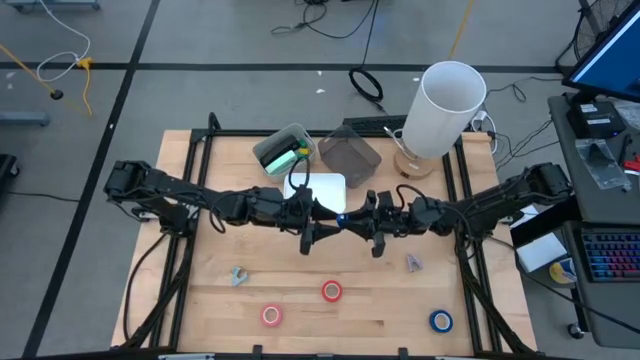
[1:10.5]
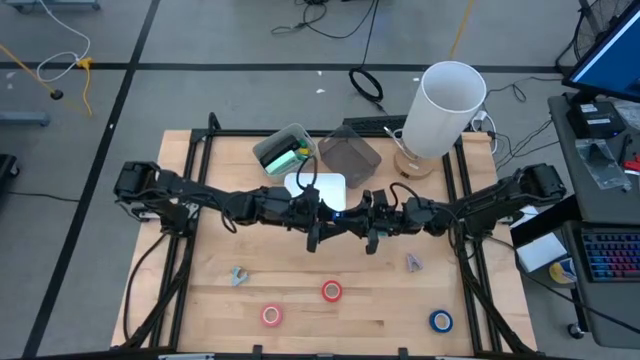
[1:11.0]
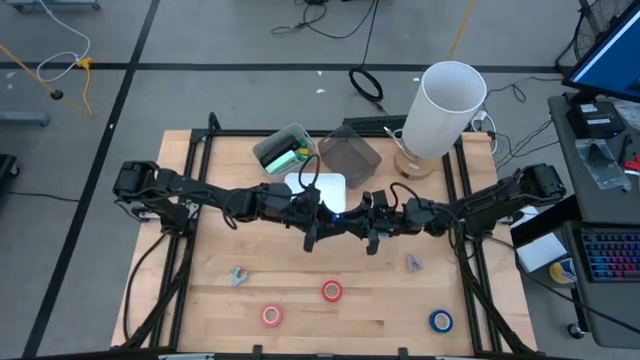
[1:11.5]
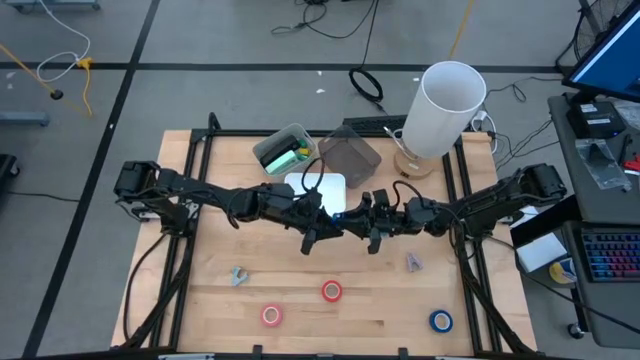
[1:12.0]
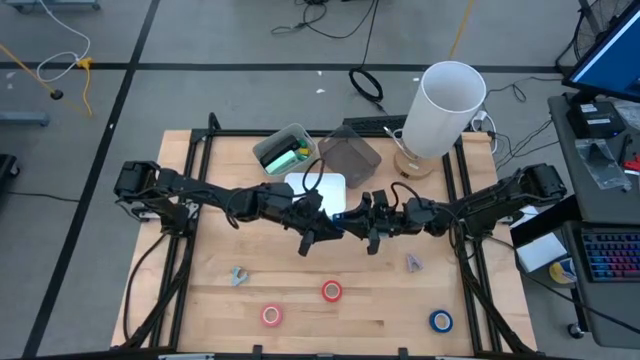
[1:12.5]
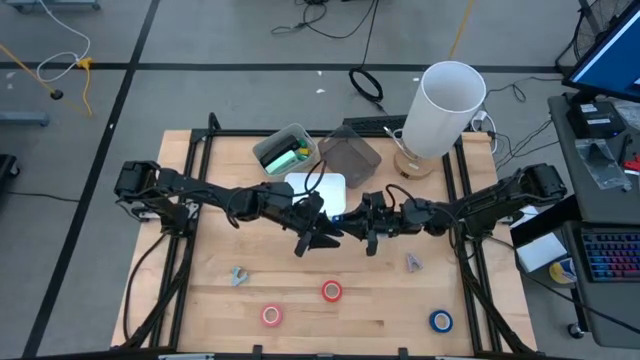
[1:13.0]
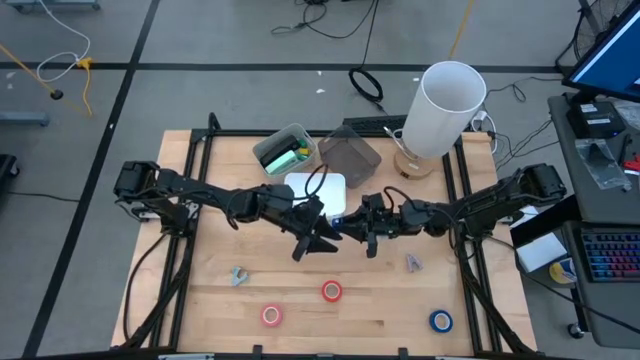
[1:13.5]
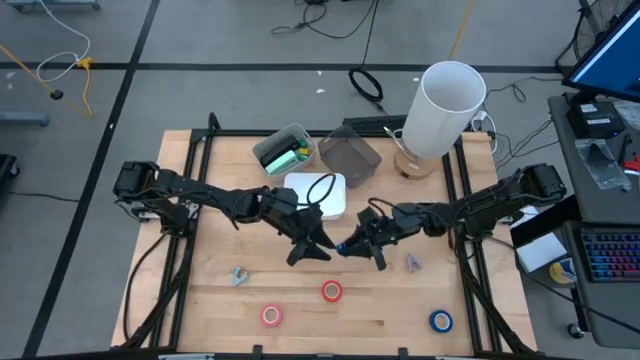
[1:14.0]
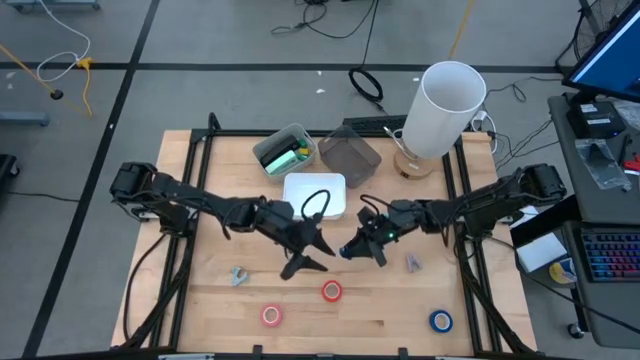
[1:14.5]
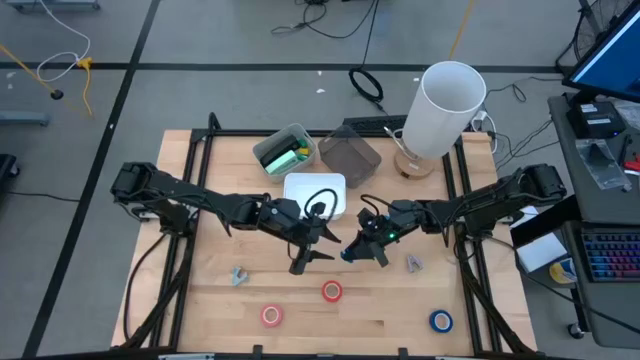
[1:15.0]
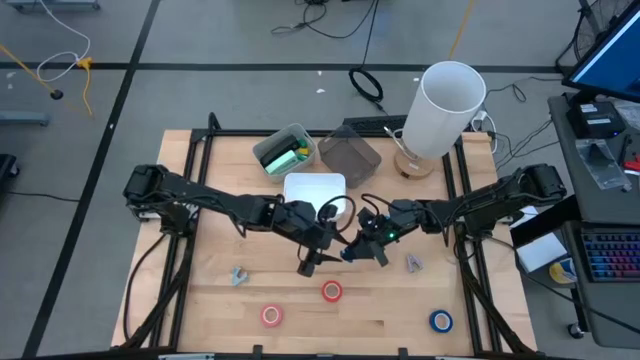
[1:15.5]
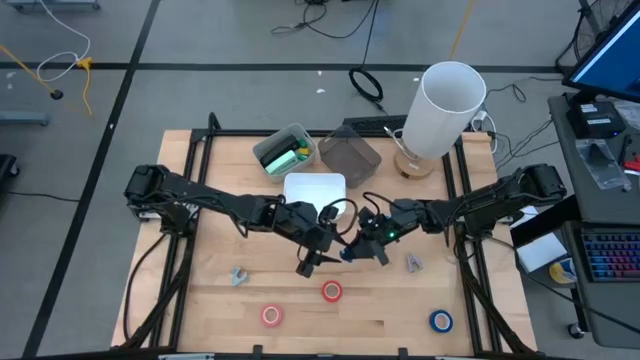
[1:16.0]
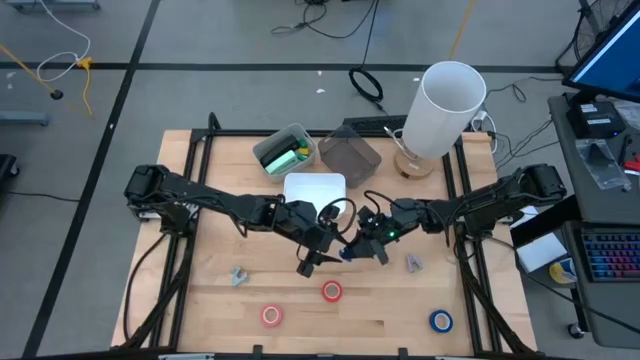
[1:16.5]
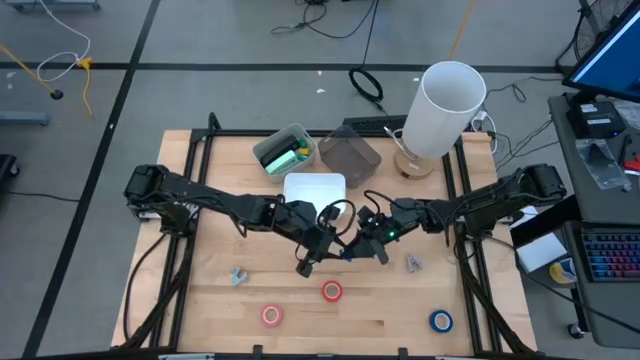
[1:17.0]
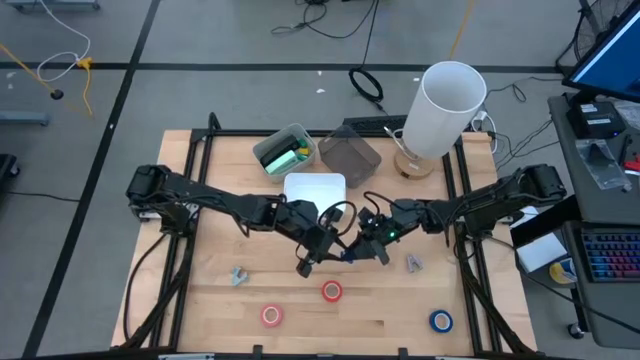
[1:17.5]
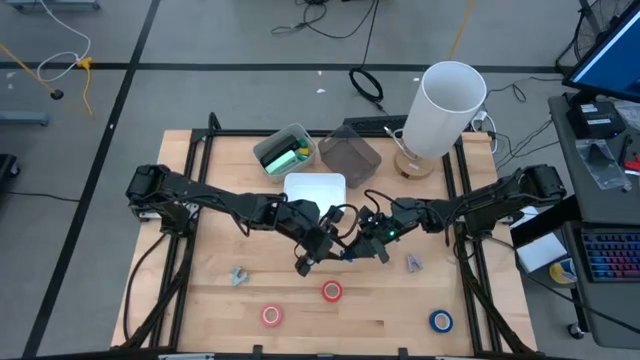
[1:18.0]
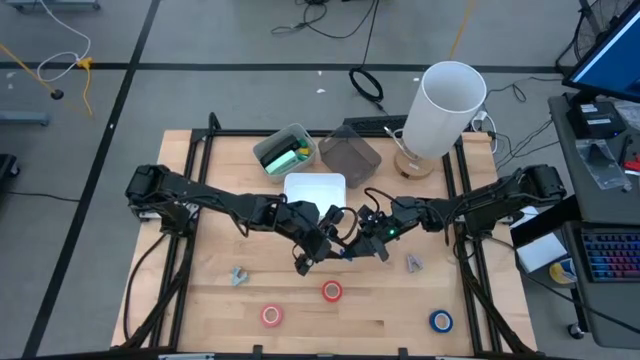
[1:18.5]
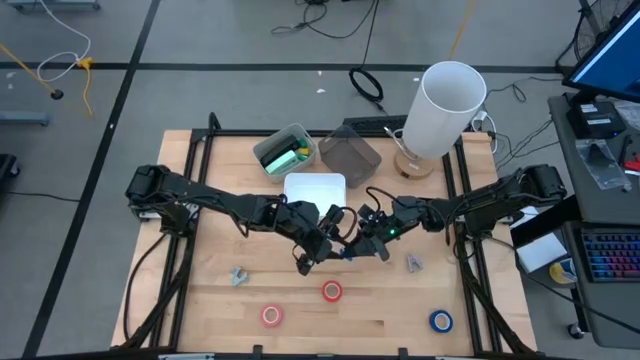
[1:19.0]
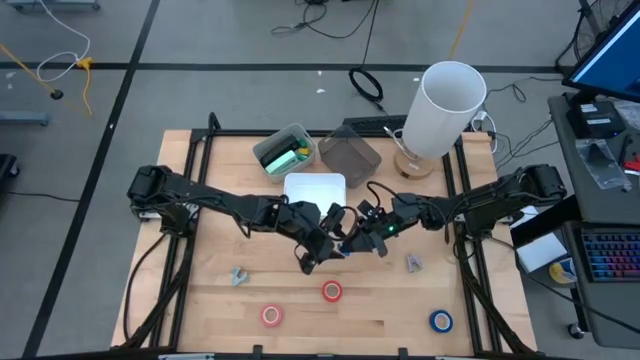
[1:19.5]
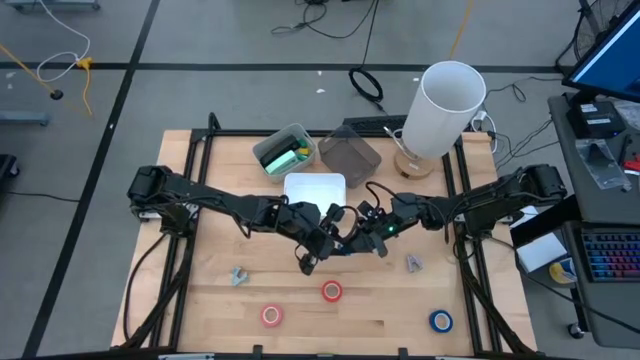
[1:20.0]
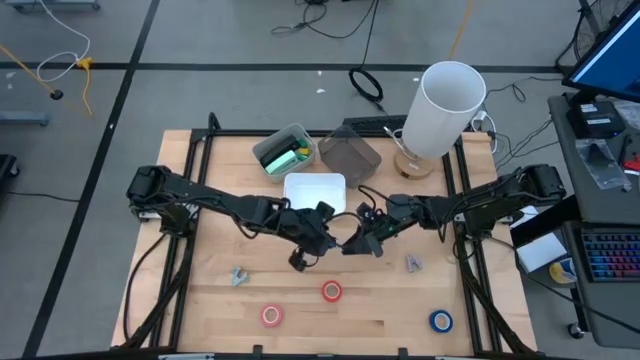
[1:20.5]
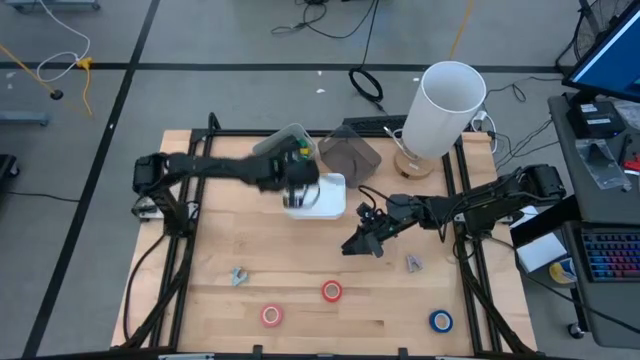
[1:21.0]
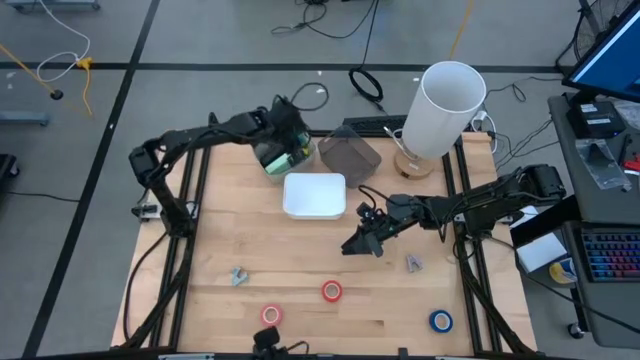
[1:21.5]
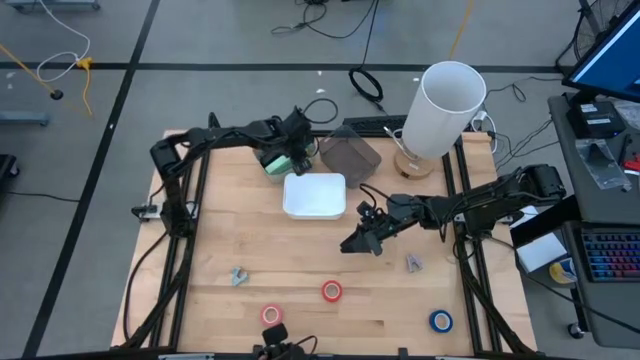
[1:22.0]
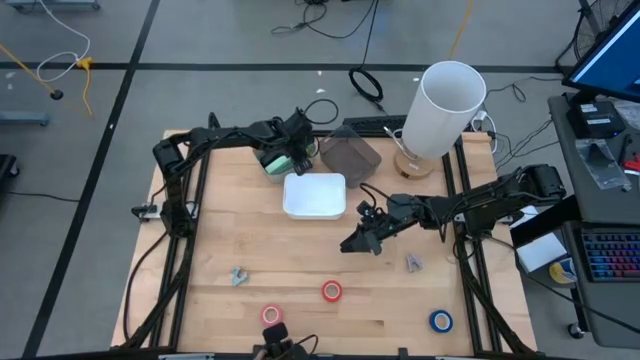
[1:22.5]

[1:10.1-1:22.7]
Task: Pick and place Stapler, Stapler remover, tape
Put the blue stapler into the gray bin

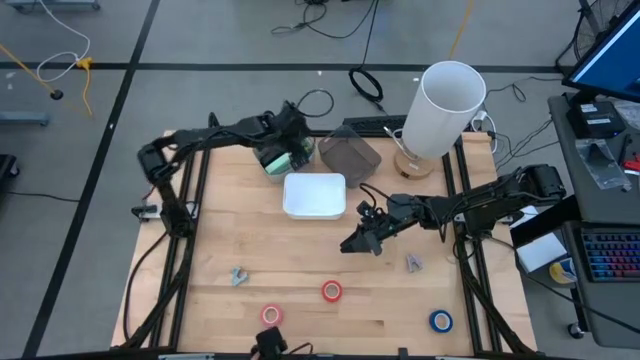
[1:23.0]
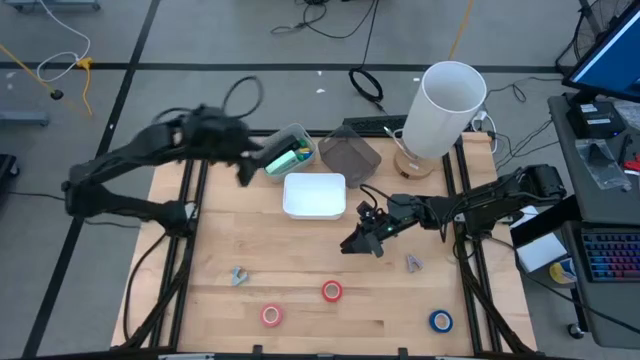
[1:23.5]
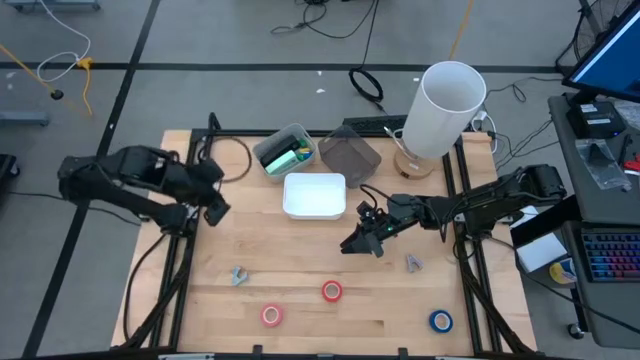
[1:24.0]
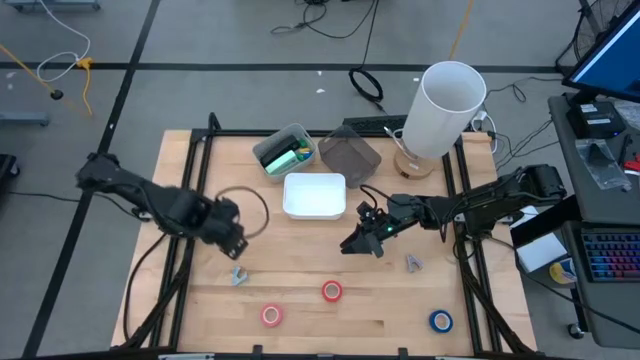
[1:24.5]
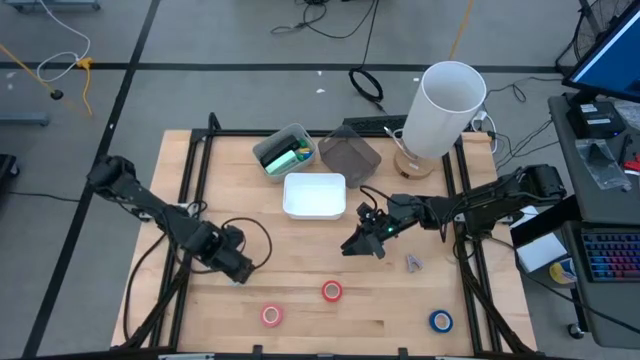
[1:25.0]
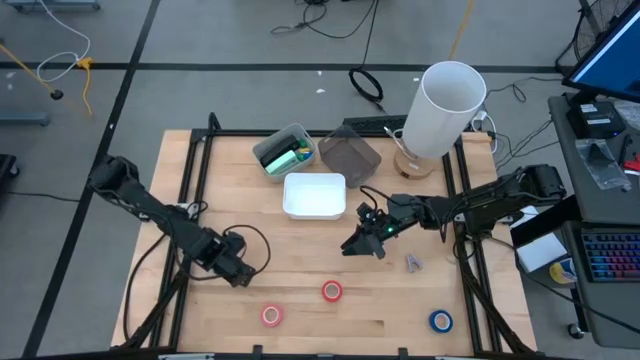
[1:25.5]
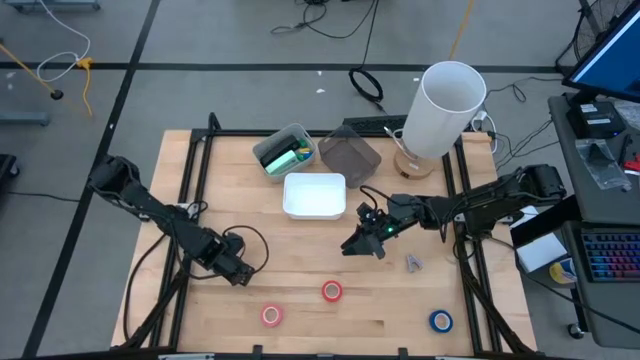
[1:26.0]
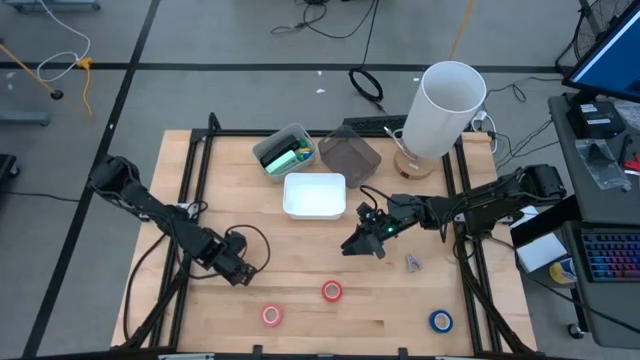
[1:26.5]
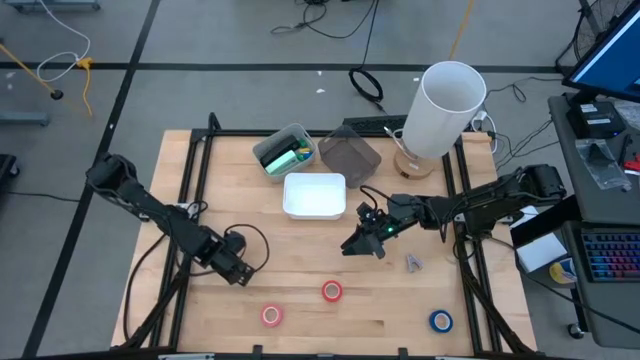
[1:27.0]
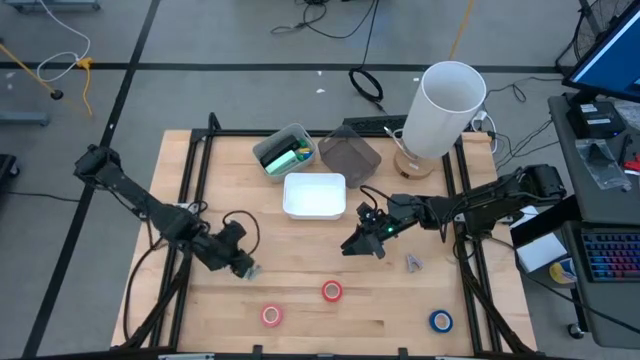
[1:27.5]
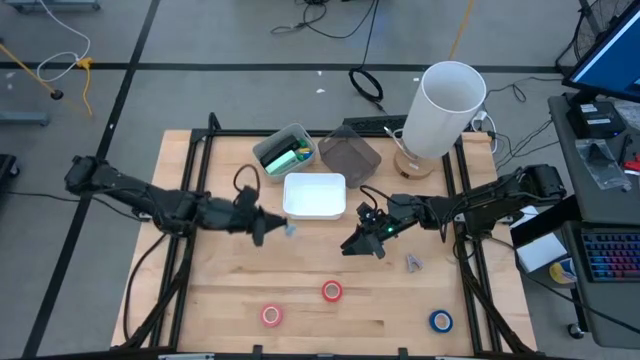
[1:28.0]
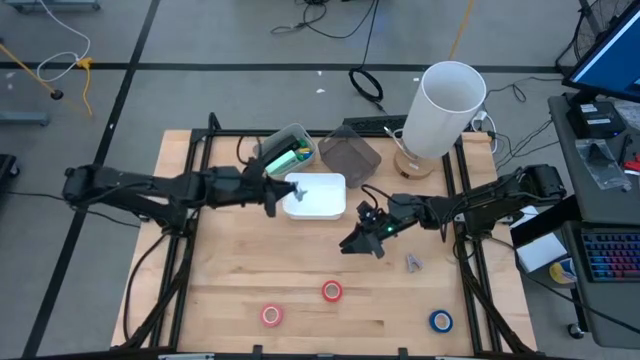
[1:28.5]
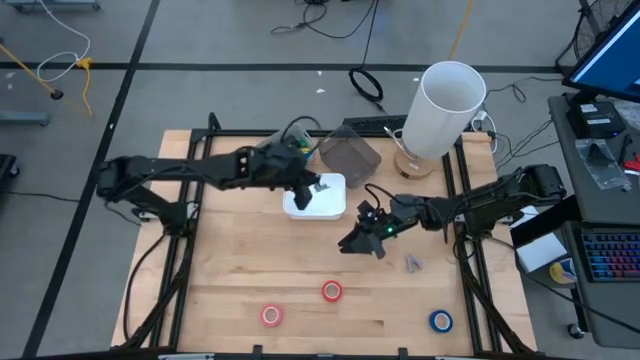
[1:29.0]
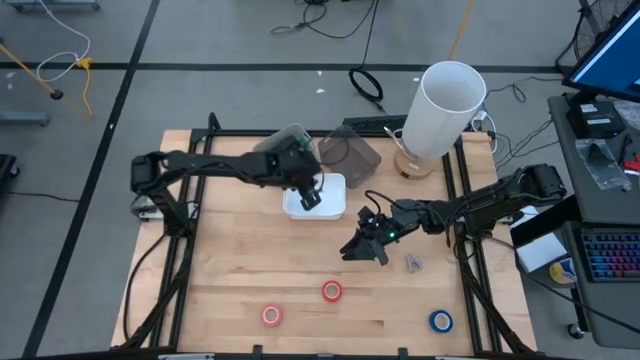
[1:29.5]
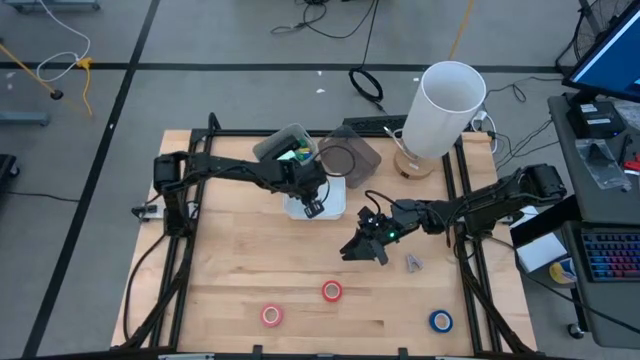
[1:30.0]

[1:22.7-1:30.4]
Put the gray staple remover into the white bin
